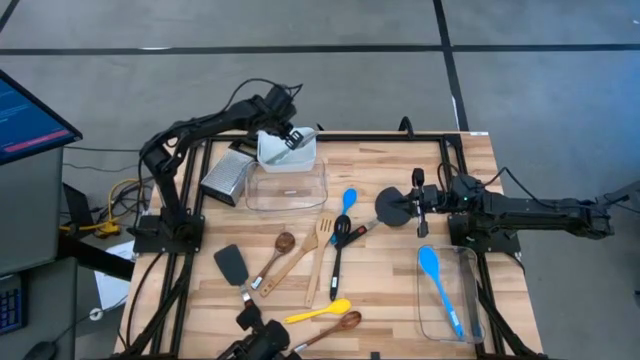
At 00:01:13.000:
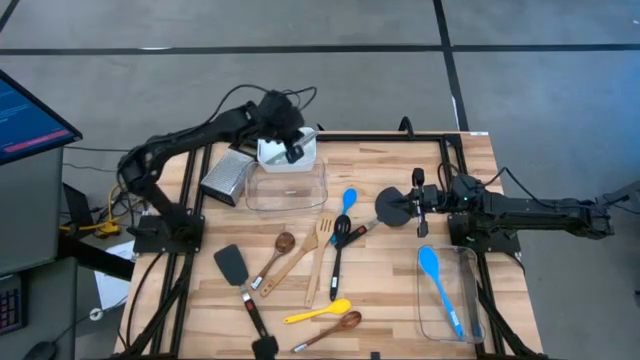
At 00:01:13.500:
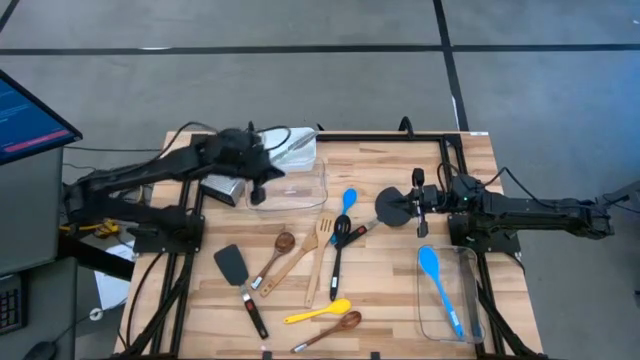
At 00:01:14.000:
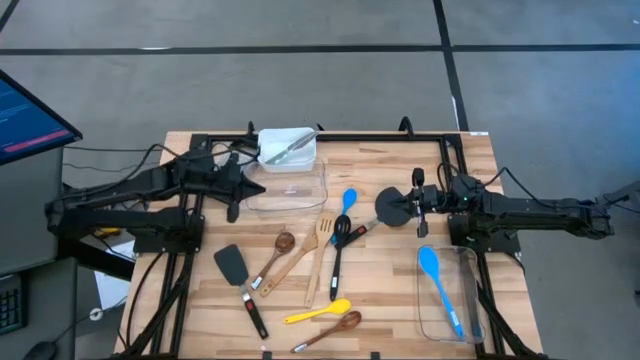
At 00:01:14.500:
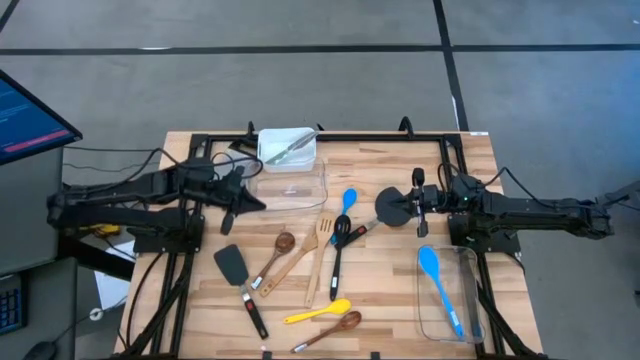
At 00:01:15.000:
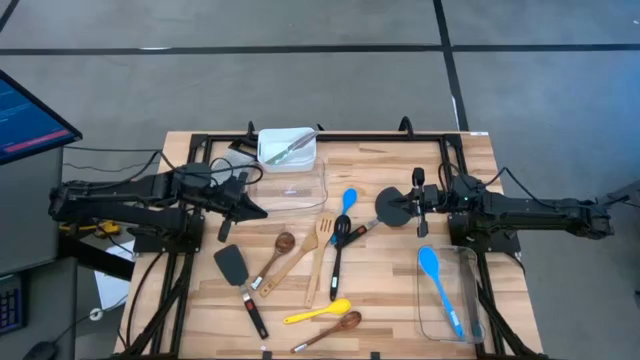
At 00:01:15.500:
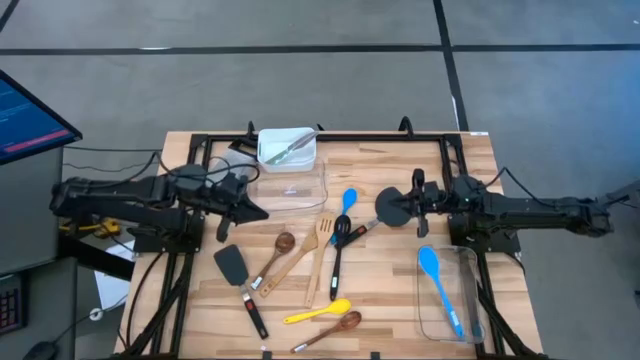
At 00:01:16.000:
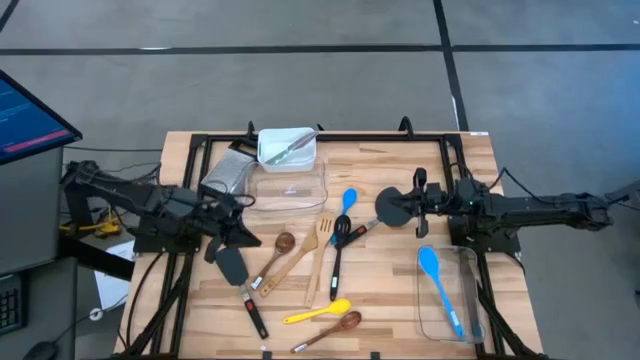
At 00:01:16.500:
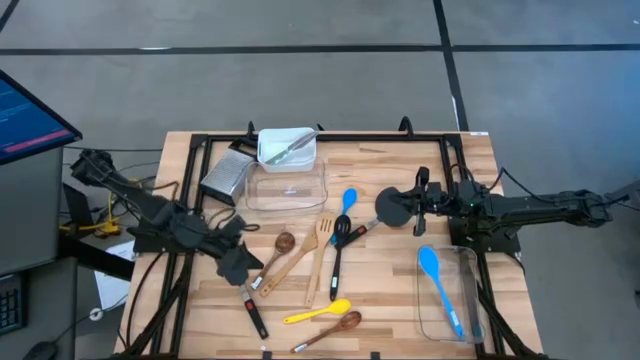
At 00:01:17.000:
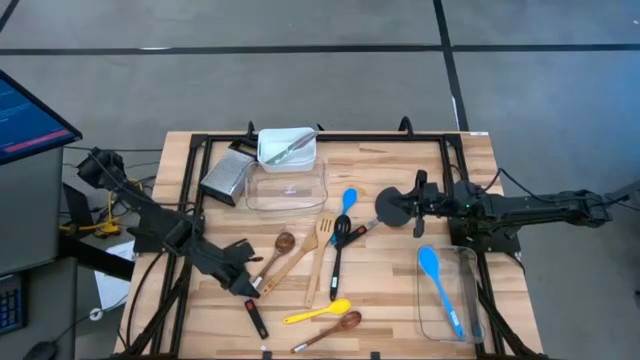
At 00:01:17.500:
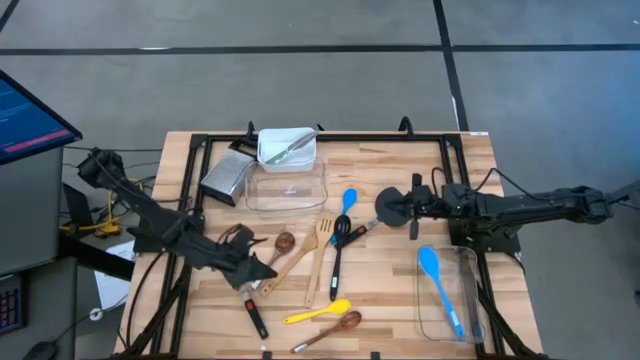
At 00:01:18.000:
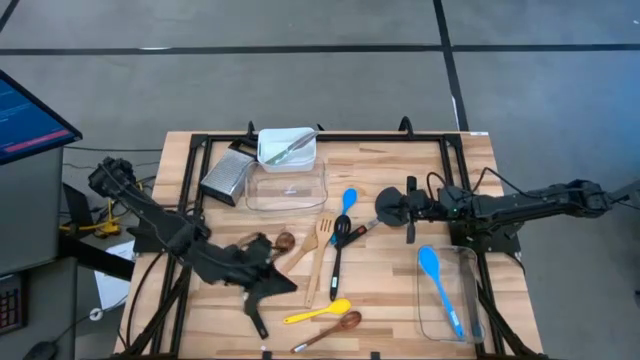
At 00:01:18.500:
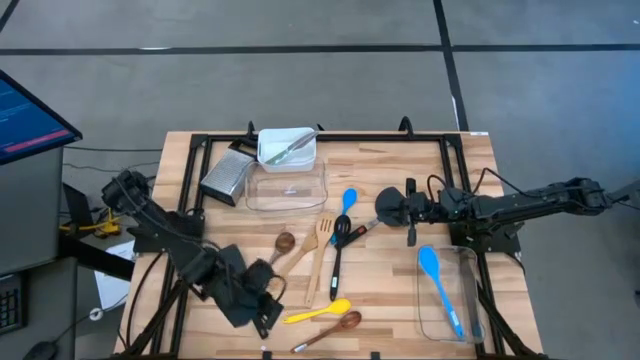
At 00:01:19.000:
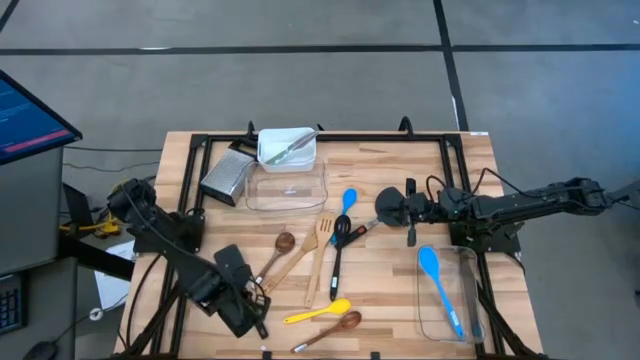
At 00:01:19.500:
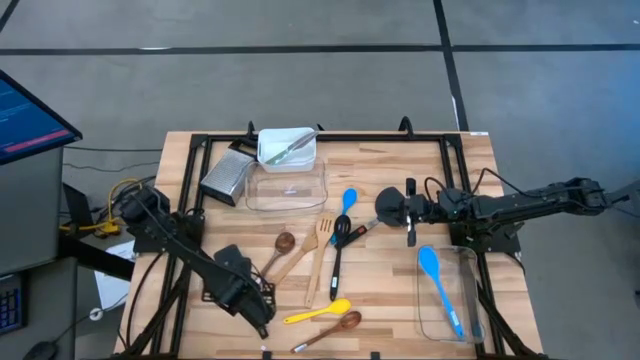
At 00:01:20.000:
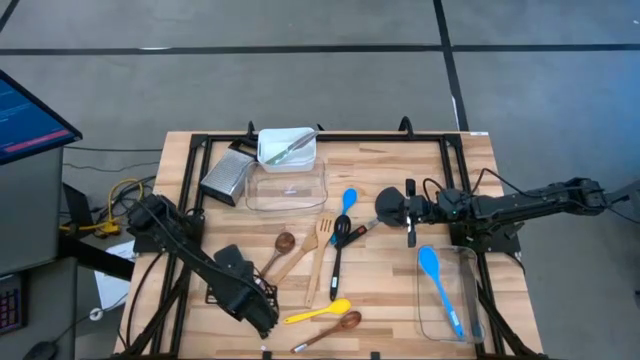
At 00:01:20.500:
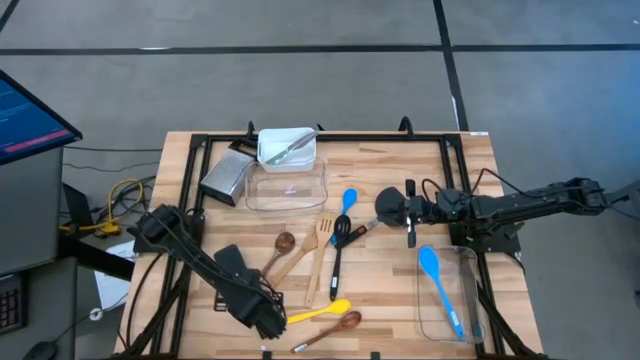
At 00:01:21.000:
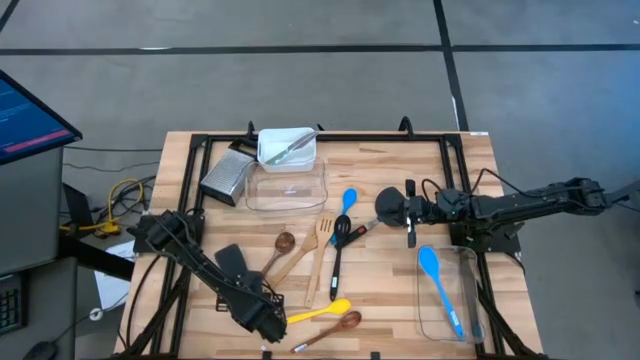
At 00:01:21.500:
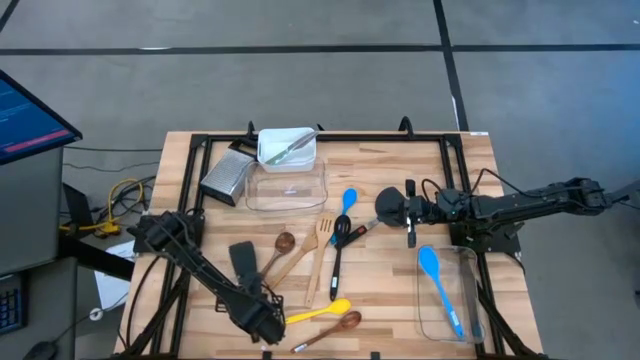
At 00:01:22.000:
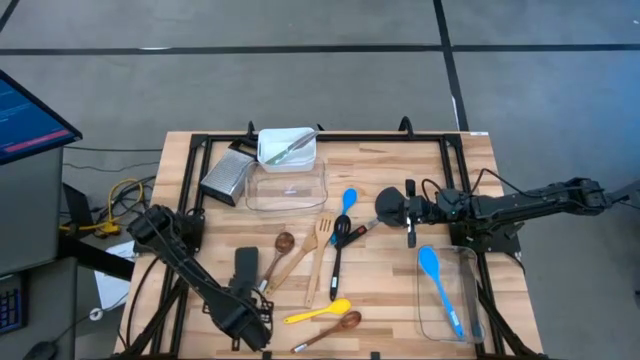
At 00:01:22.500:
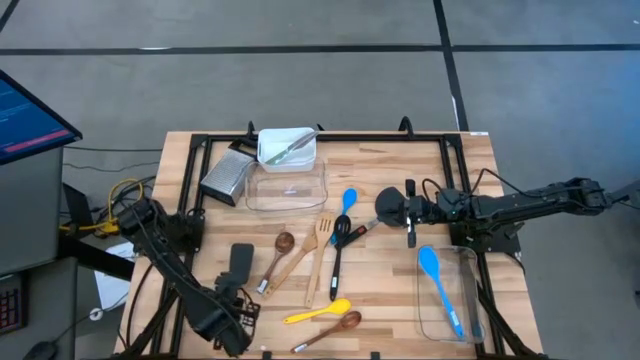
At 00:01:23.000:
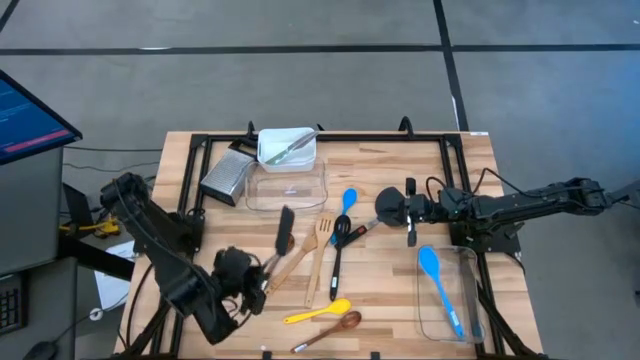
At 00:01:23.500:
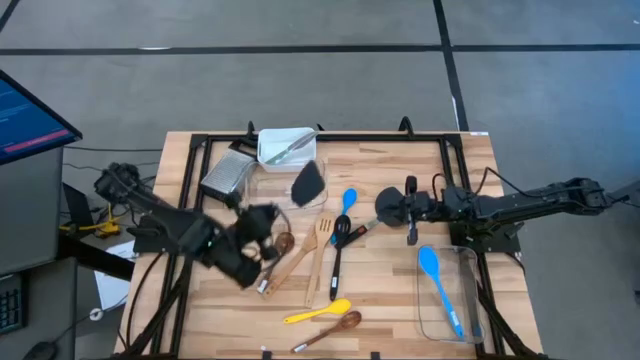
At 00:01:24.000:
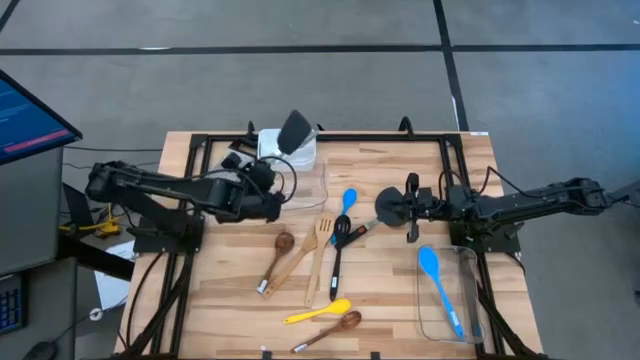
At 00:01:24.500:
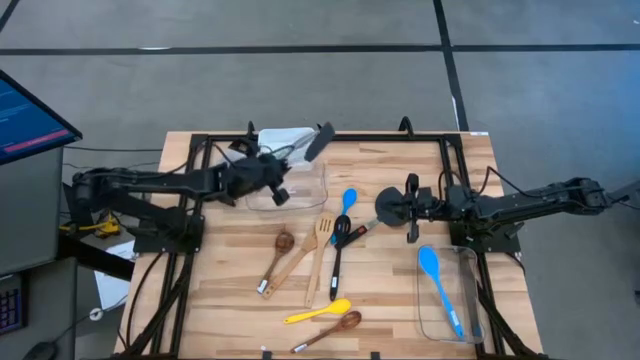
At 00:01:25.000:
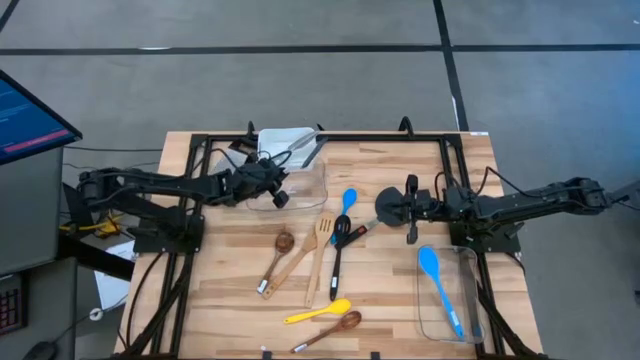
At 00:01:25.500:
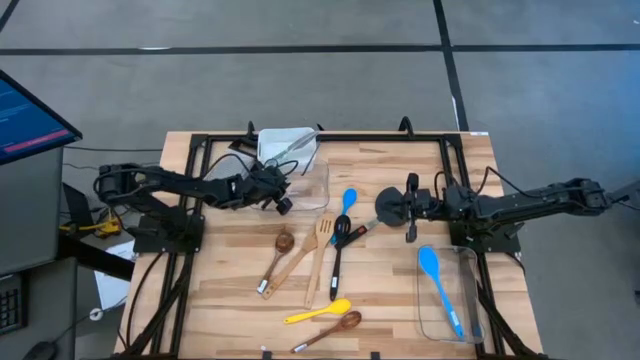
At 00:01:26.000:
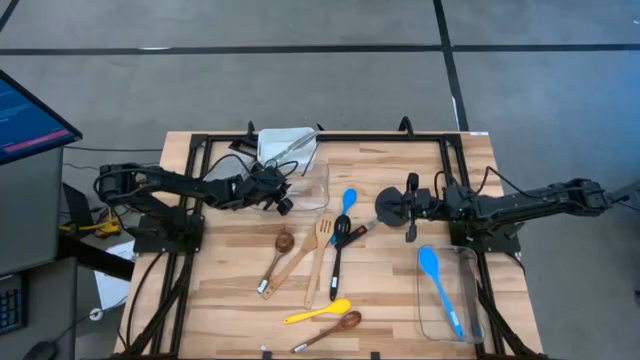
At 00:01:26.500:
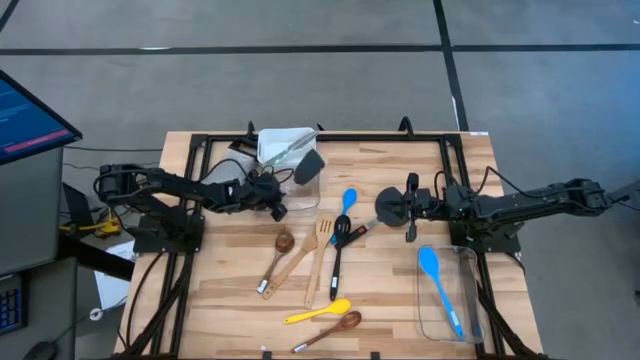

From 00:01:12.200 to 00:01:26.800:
Task: Pick & Place Kitchen Items
Put the left solid turner spatula into the top transparent bin

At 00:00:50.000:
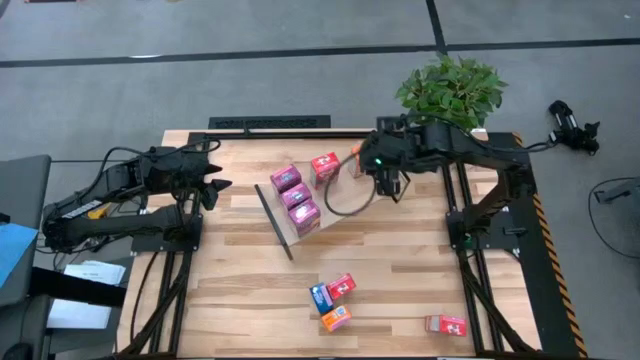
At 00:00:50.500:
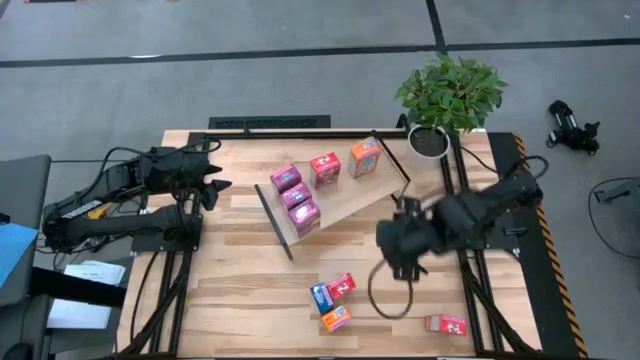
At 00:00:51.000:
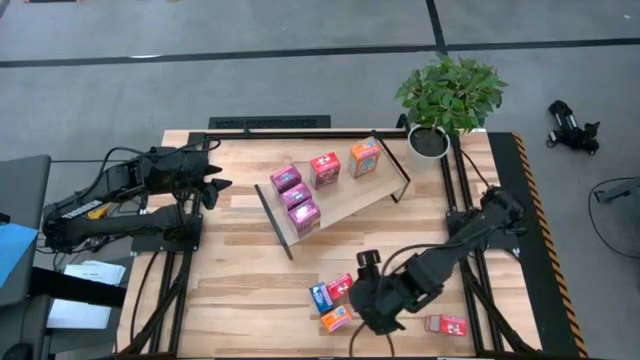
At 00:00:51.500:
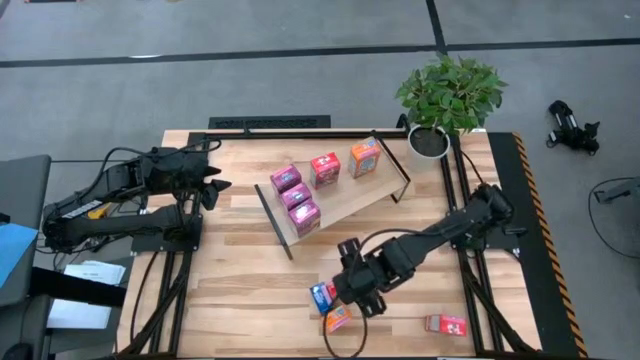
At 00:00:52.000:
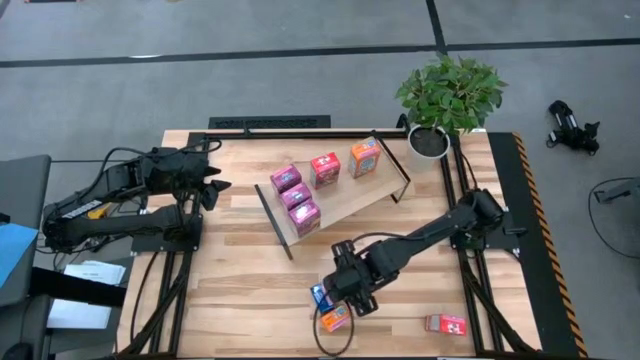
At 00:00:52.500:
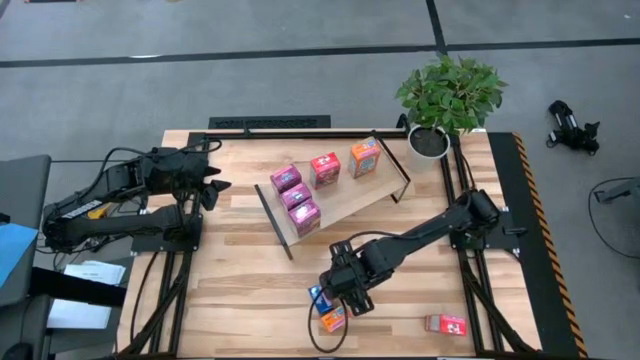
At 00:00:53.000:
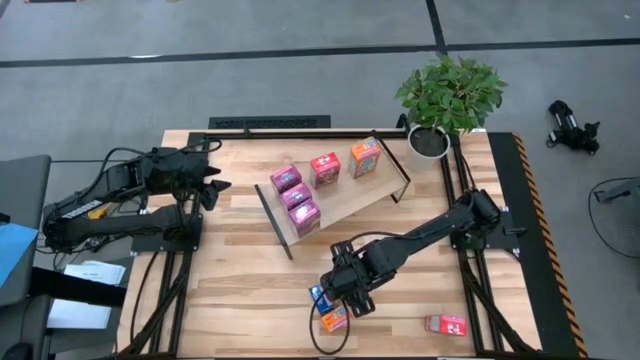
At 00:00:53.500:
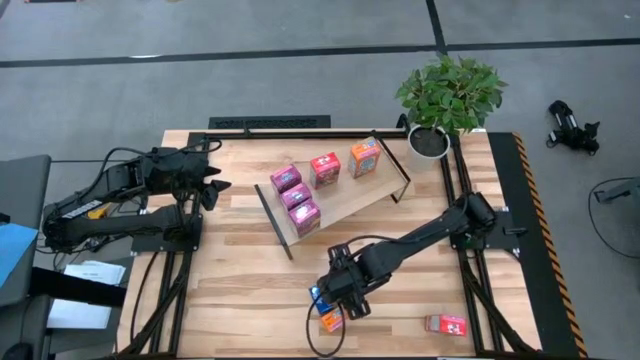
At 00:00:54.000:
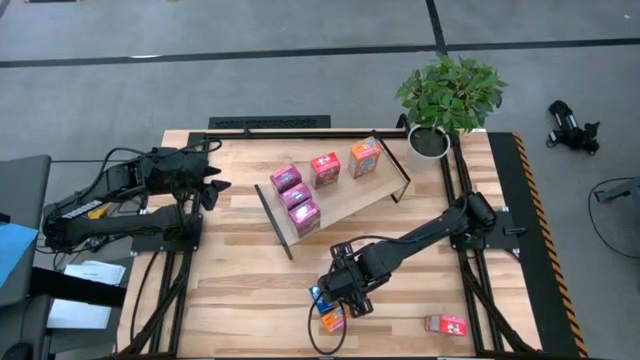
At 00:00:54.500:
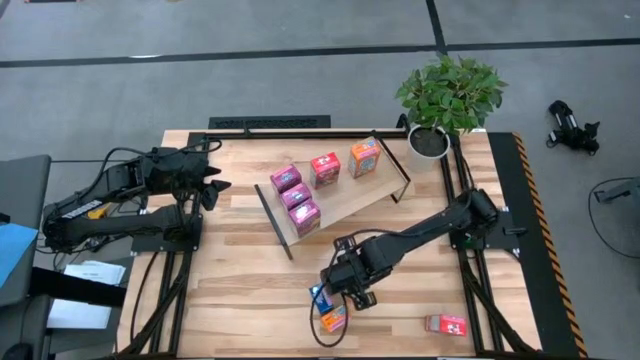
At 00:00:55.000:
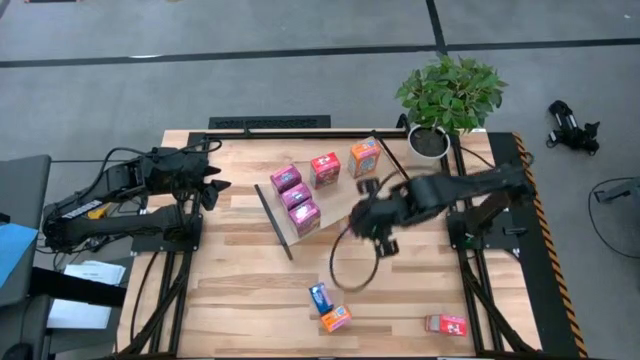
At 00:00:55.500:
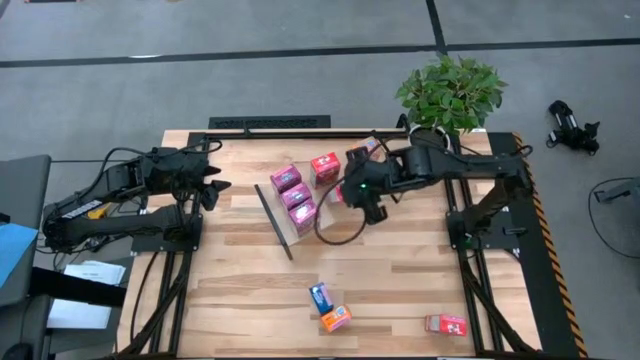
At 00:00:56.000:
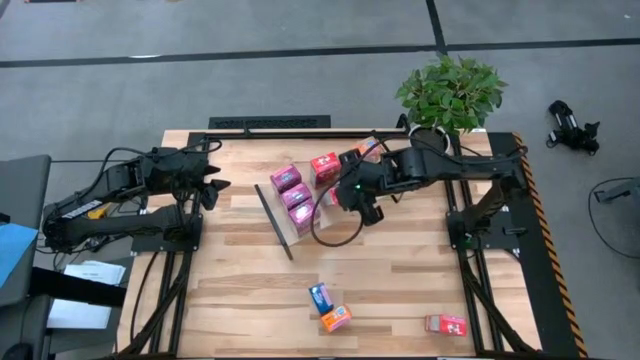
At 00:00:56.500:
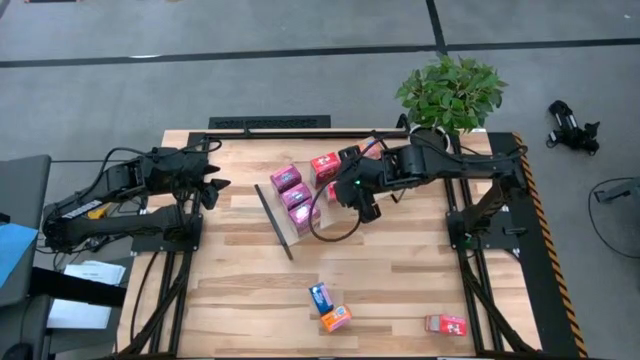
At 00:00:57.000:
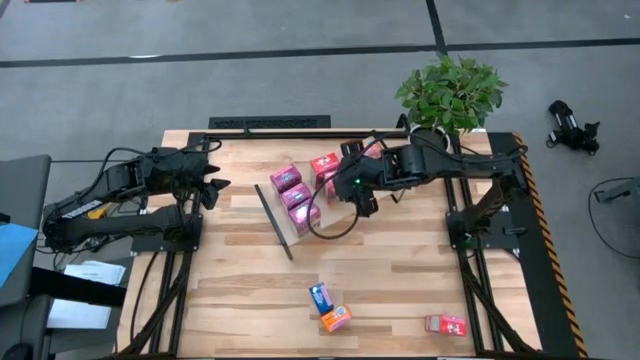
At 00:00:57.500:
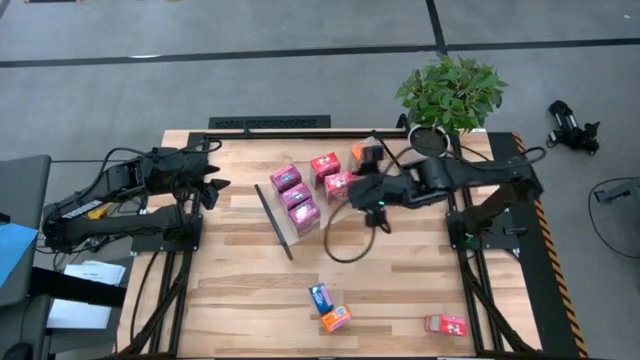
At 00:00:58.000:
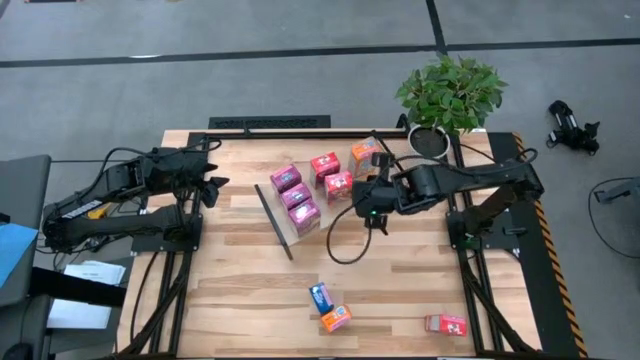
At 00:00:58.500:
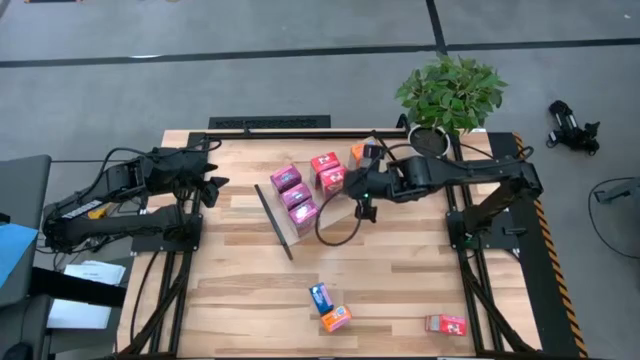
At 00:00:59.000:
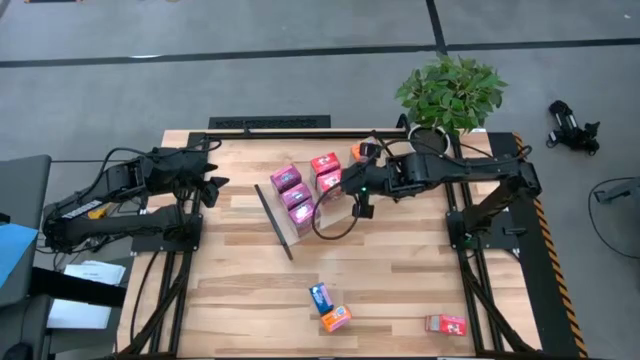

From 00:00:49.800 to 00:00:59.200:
Task: Stack cereal on shelf
Put the left red cereal box aligned with the other red cereal box on the shelf
